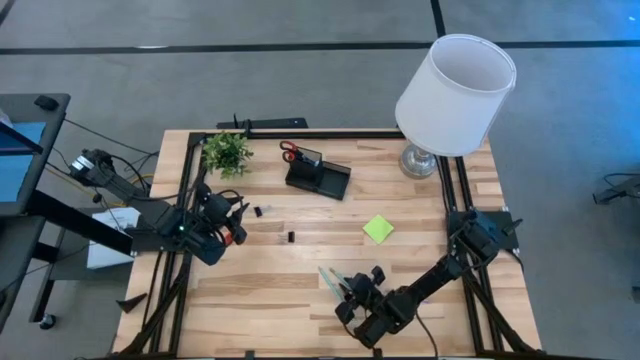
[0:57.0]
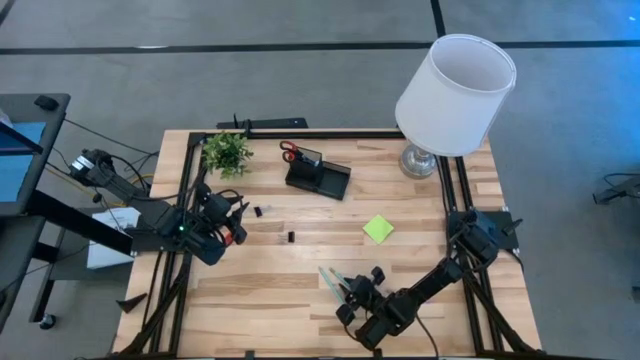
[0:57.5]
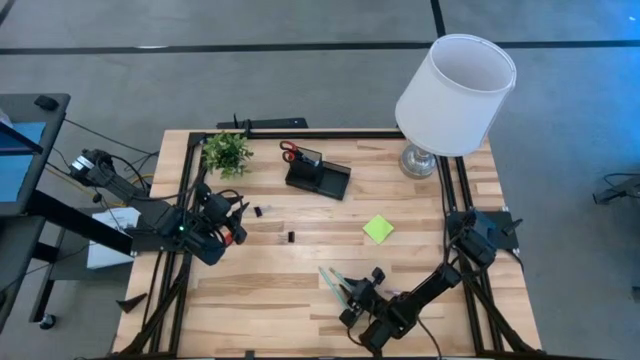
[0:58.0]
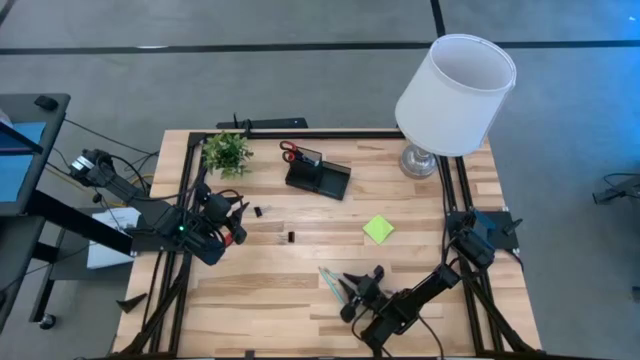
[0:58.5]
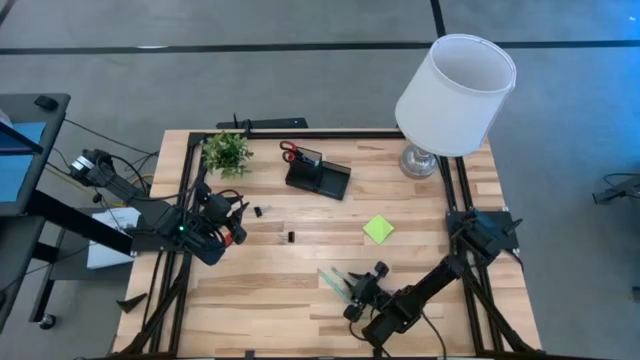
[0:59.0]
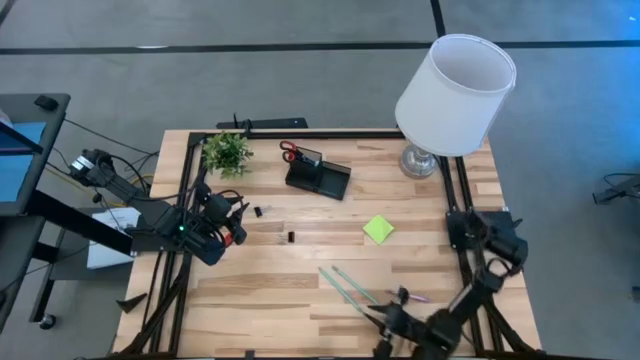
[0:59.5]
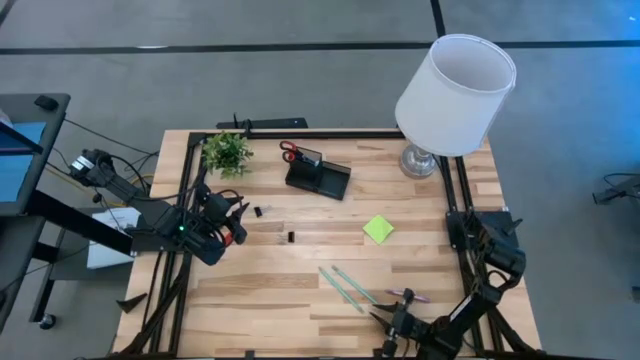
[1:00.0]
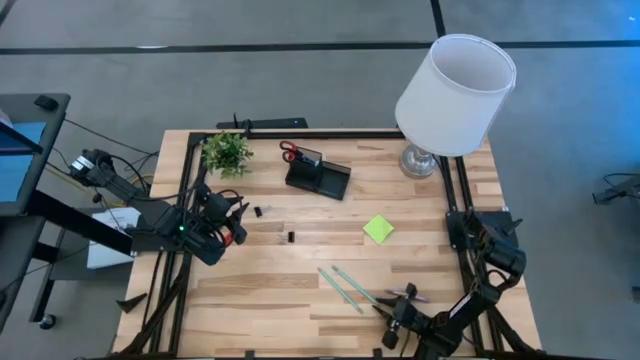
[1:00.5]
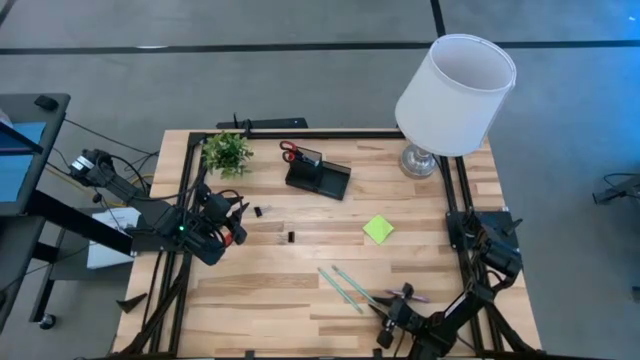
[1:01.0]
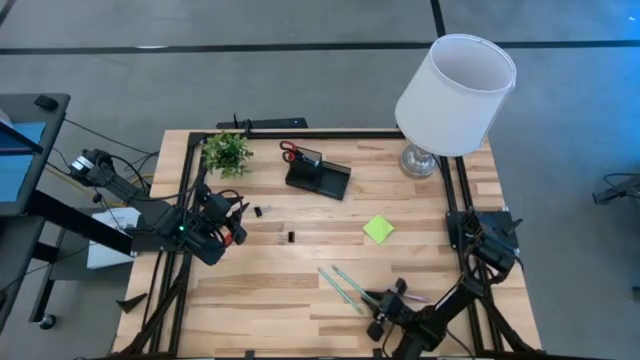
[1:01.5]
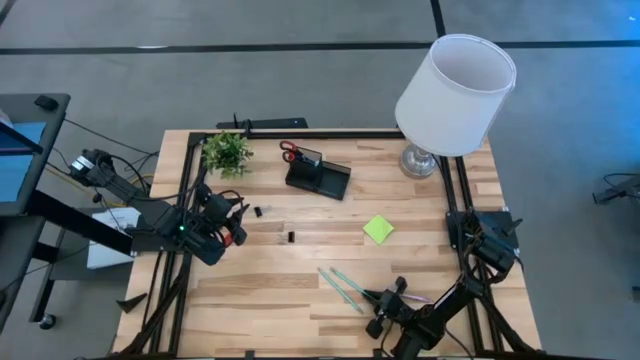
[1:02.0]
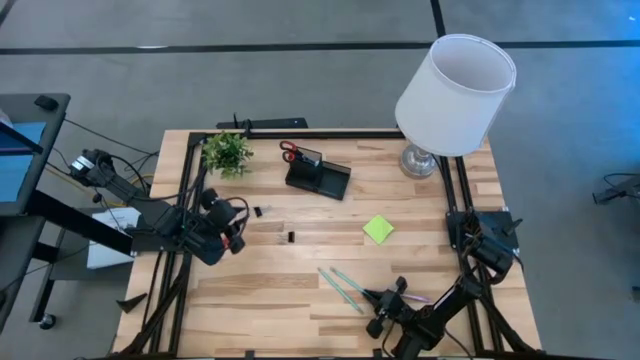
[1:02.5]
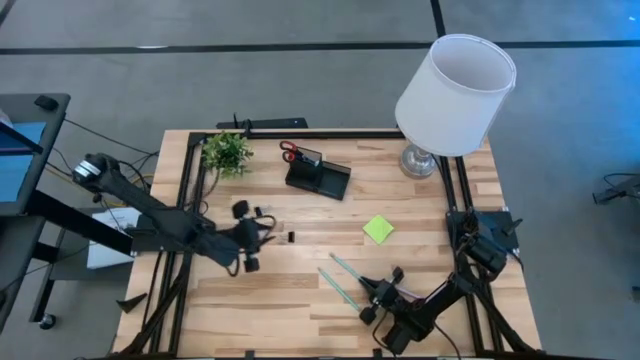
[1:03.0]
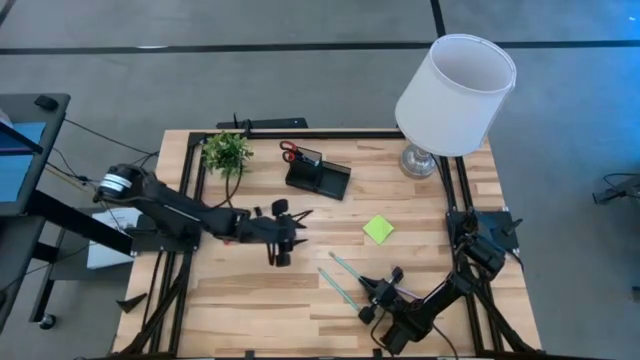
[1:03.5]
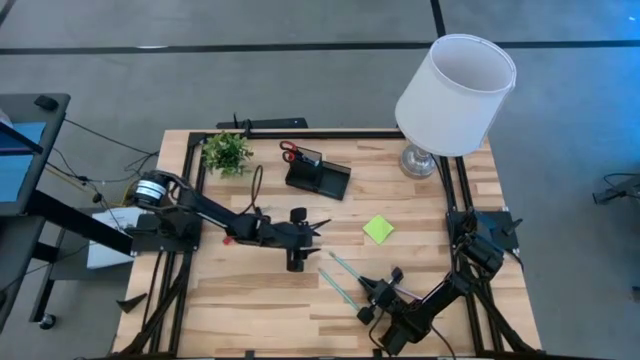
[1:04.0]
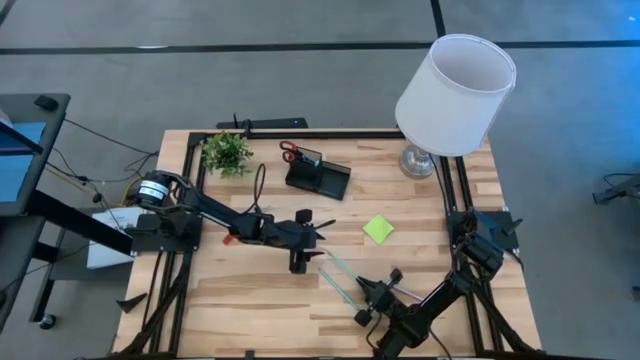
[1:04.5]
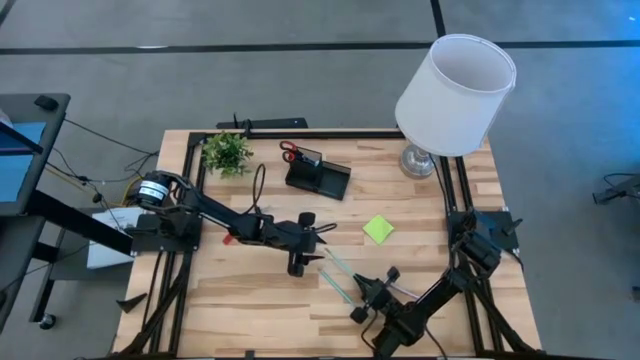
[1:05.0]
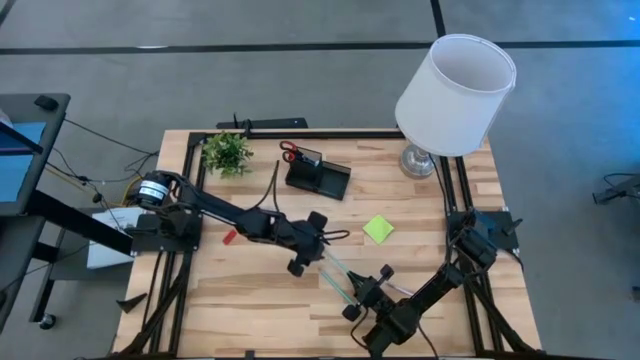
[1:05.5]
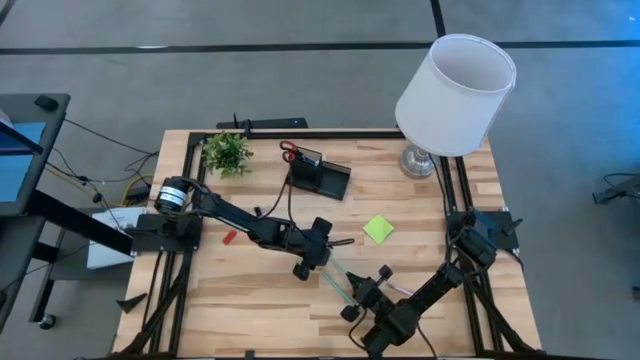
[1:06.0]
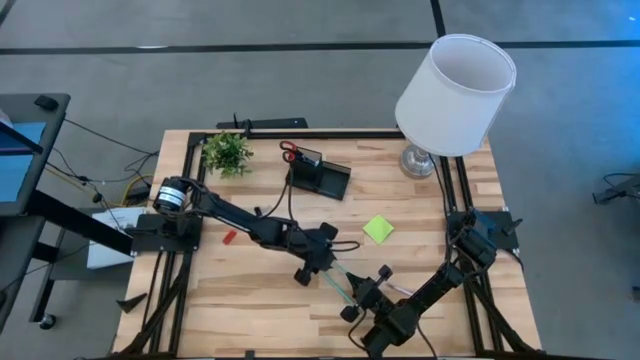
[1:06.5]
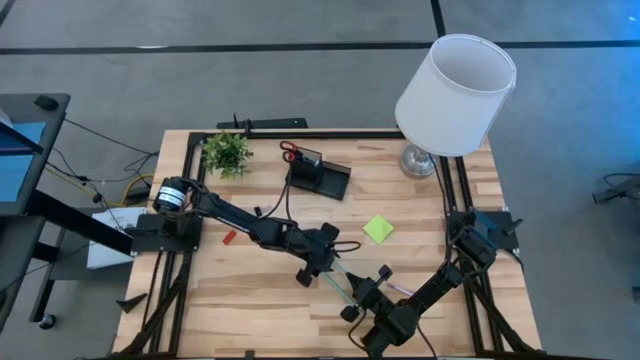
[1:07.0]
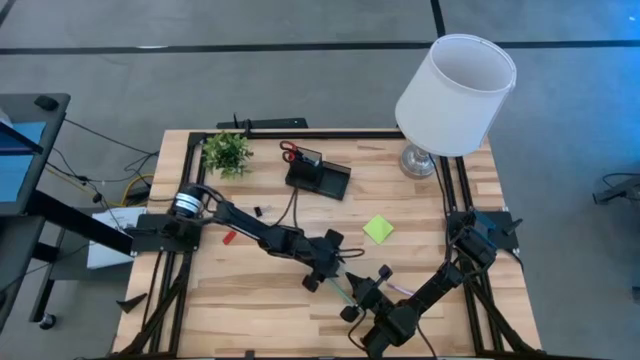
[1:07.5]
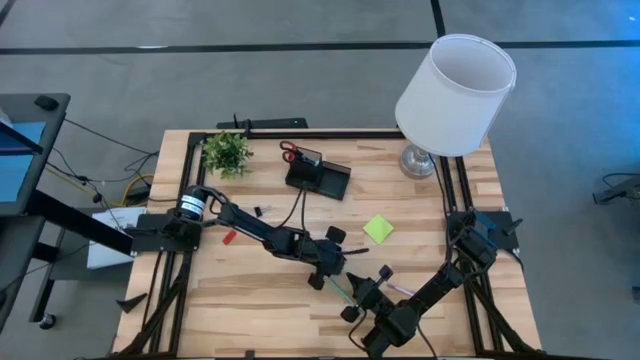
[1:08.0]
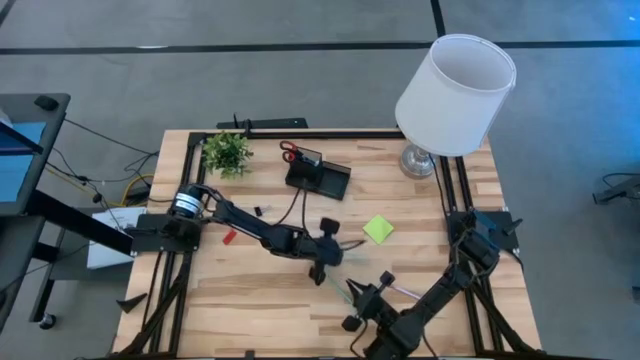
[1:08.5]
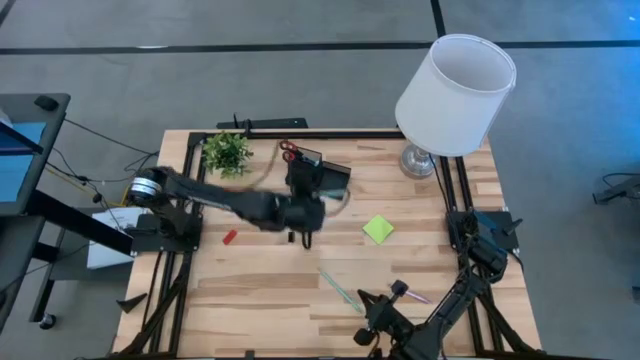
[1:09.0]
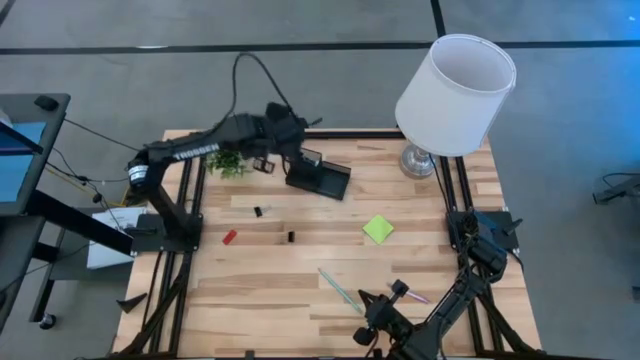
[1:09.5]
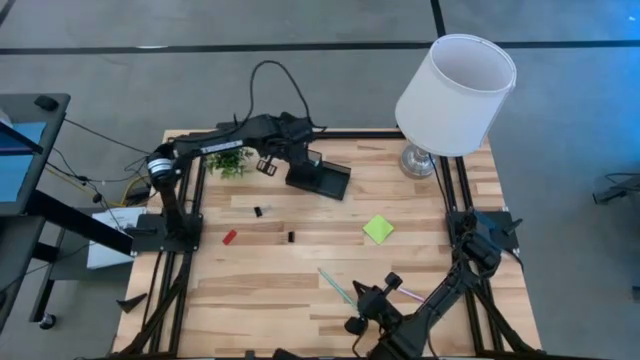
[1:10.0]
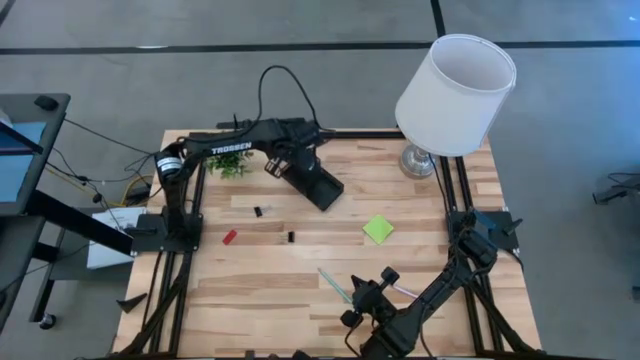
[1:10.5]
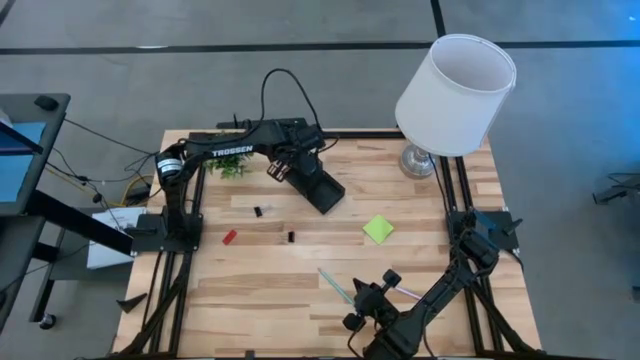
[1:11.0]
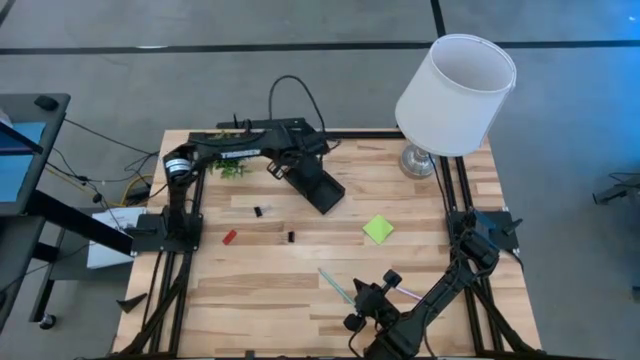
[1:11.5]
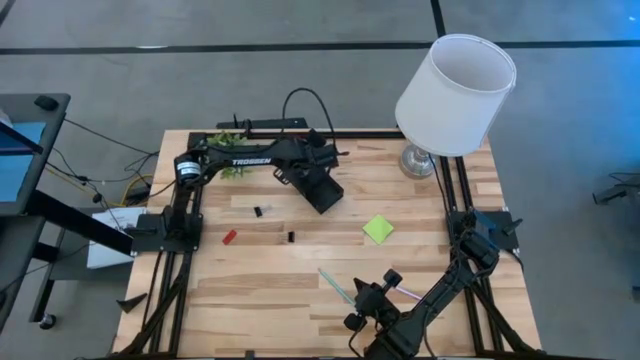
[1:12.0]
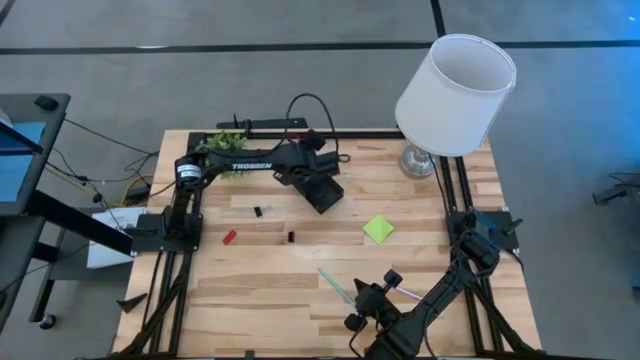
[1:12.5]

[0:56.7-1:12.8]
Task: Pick and place office supplies into organizer
Put the right blue pencil into the desk organizer
